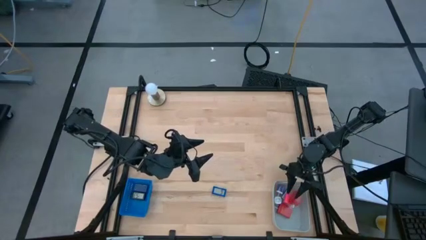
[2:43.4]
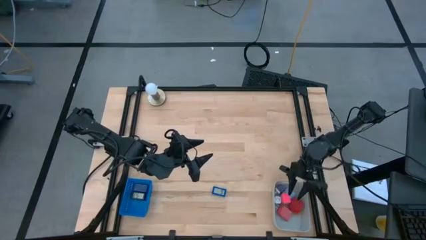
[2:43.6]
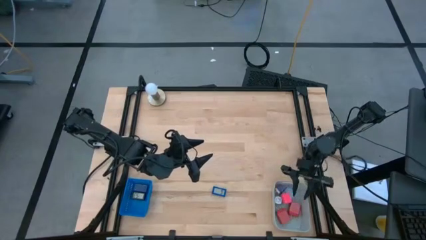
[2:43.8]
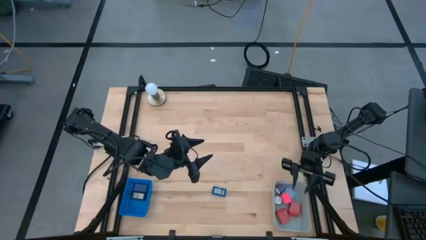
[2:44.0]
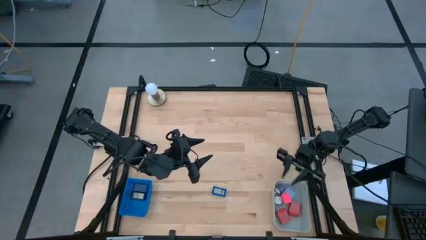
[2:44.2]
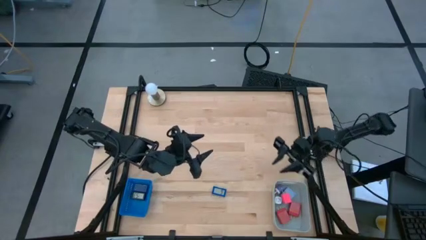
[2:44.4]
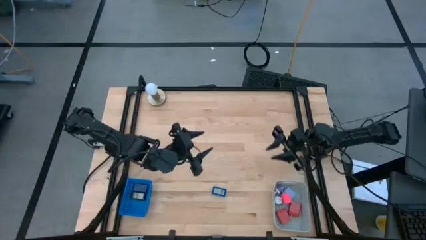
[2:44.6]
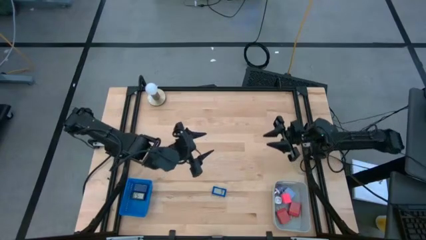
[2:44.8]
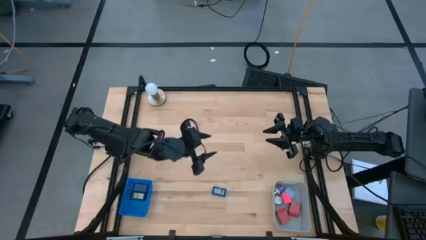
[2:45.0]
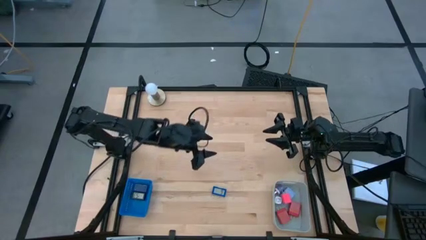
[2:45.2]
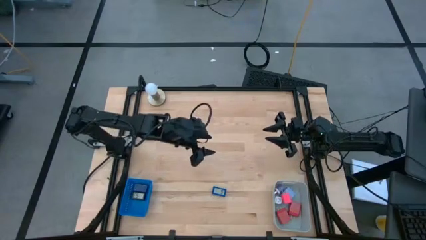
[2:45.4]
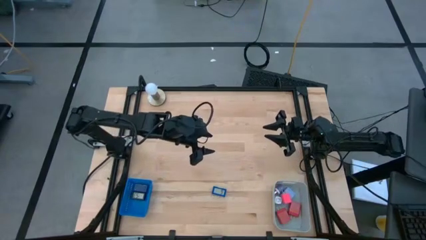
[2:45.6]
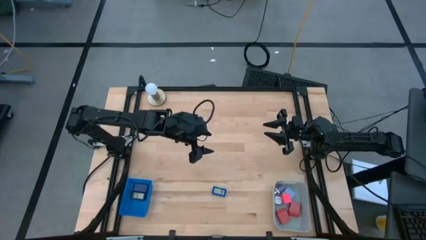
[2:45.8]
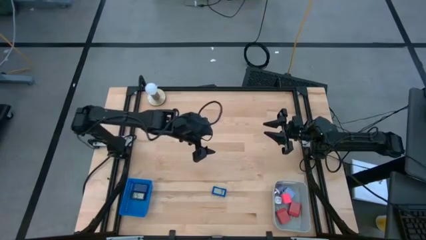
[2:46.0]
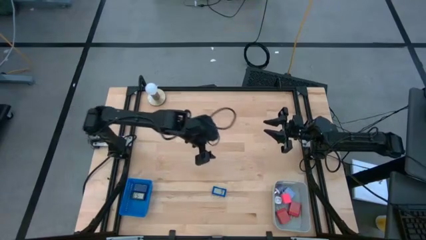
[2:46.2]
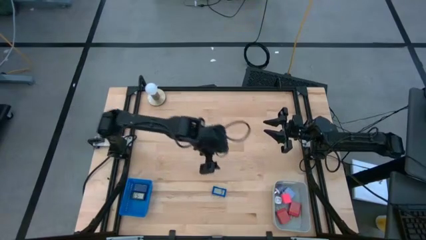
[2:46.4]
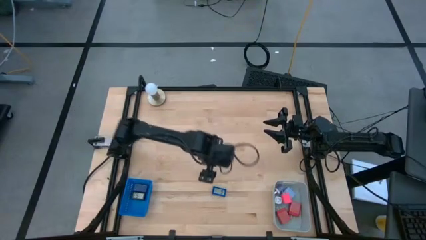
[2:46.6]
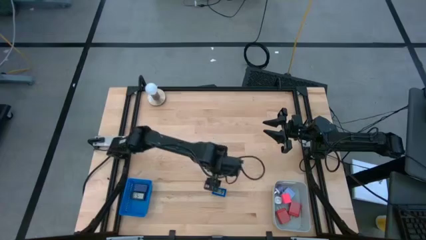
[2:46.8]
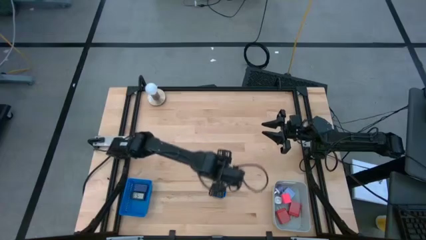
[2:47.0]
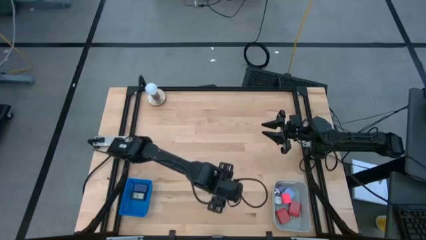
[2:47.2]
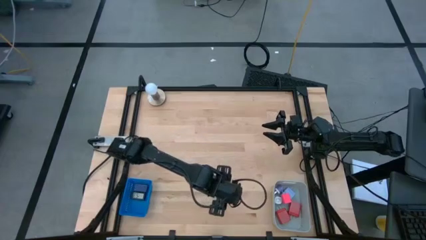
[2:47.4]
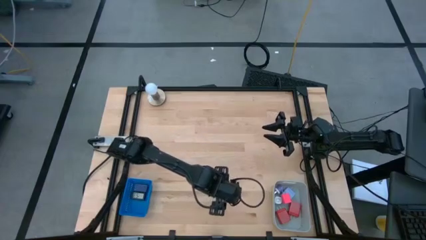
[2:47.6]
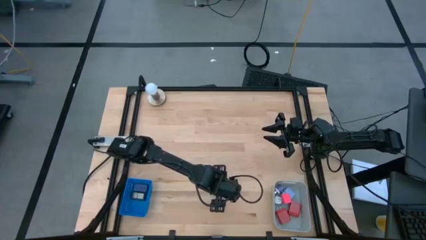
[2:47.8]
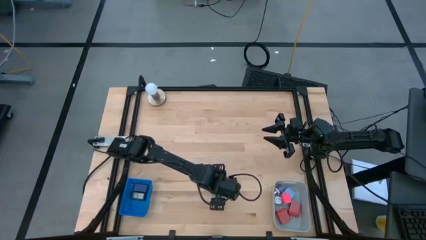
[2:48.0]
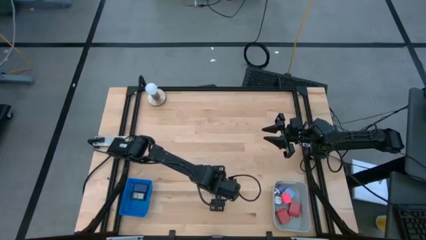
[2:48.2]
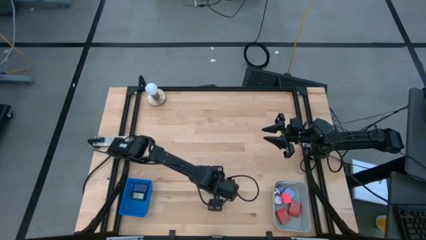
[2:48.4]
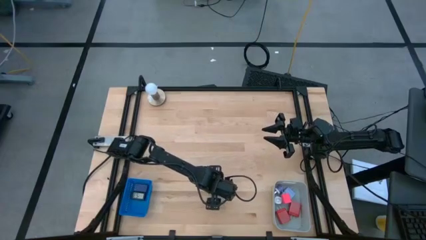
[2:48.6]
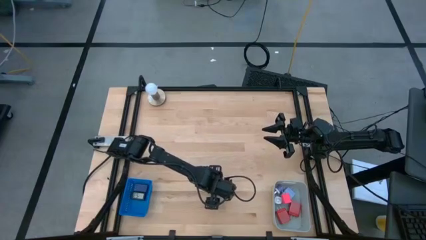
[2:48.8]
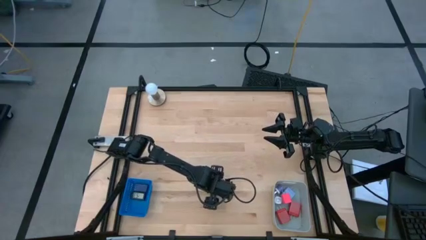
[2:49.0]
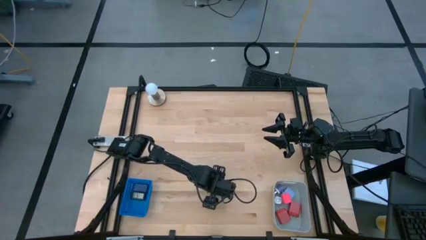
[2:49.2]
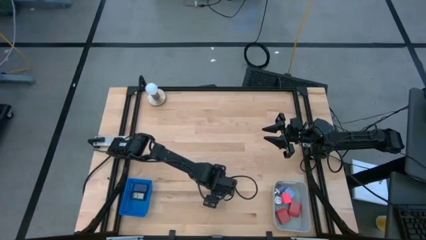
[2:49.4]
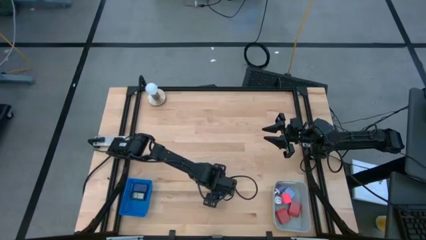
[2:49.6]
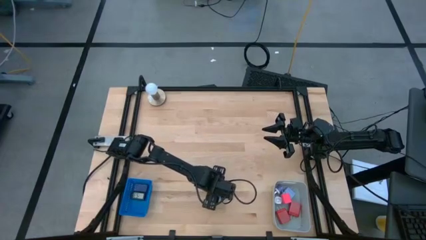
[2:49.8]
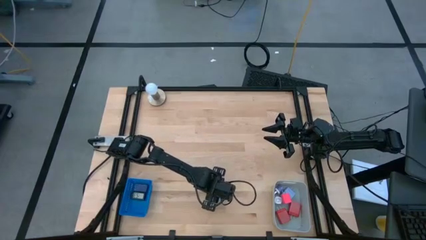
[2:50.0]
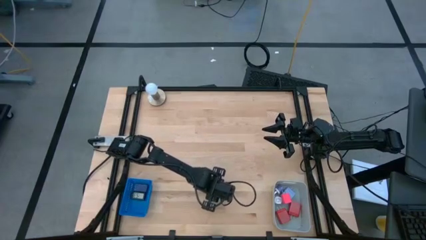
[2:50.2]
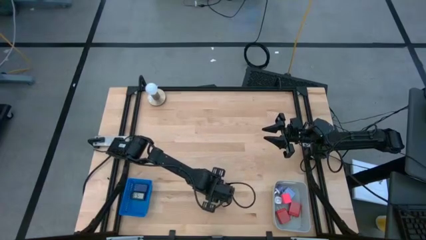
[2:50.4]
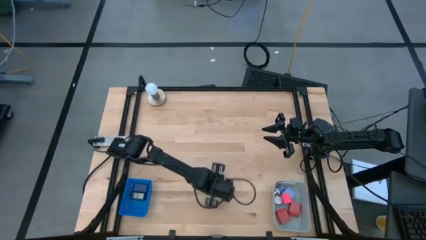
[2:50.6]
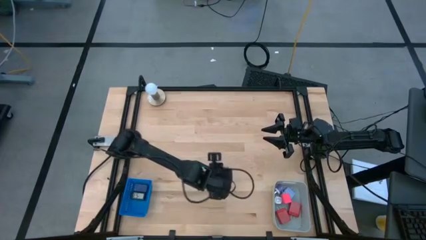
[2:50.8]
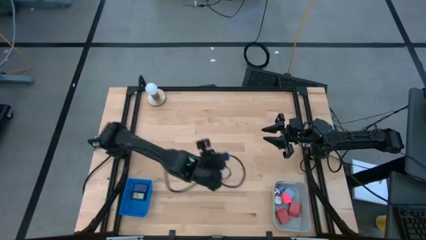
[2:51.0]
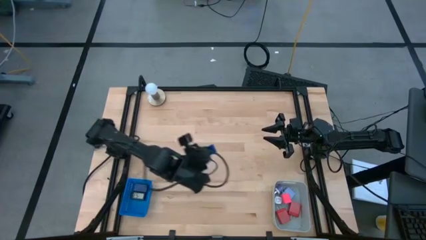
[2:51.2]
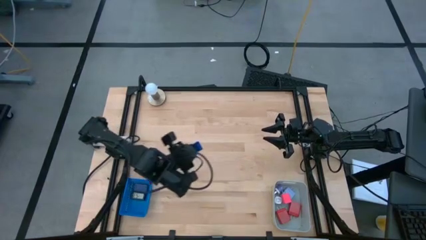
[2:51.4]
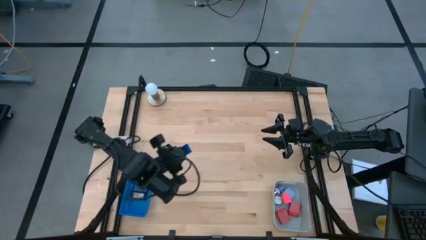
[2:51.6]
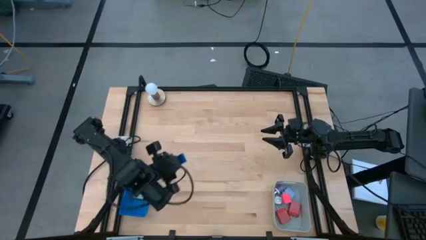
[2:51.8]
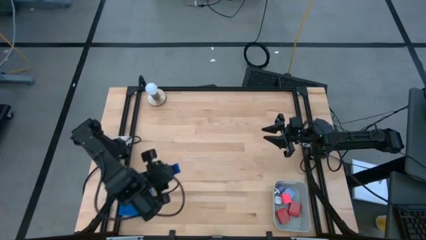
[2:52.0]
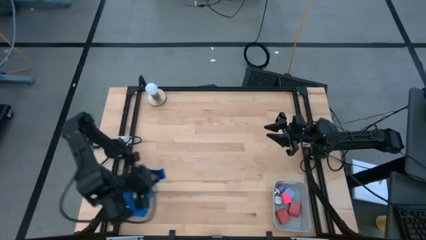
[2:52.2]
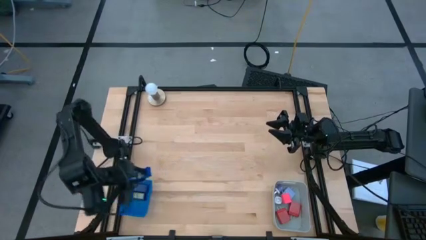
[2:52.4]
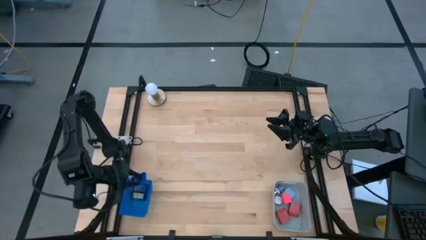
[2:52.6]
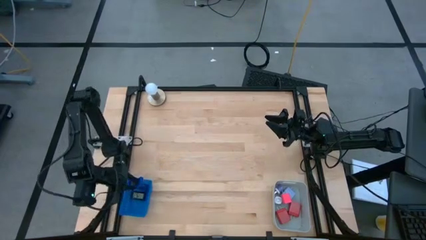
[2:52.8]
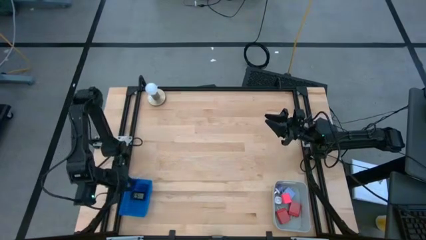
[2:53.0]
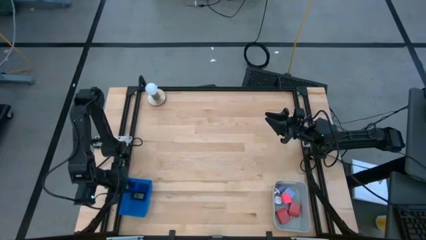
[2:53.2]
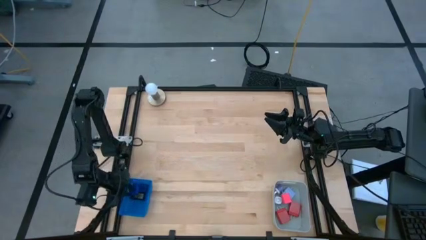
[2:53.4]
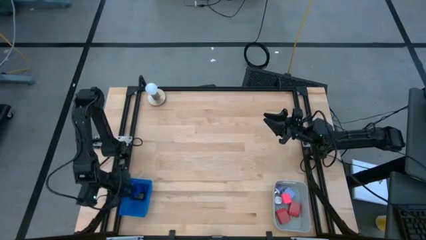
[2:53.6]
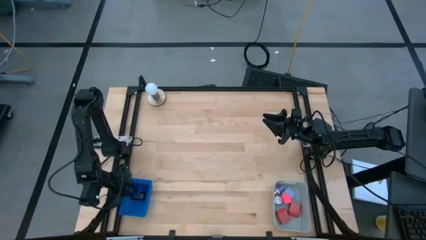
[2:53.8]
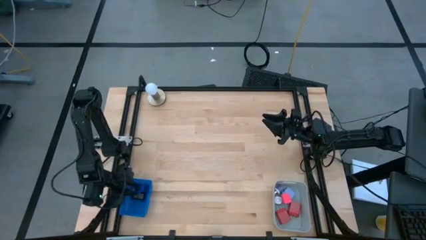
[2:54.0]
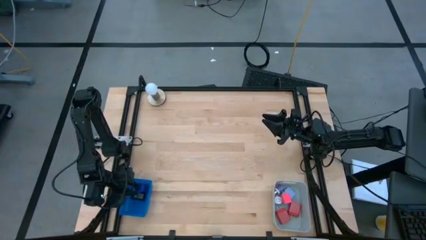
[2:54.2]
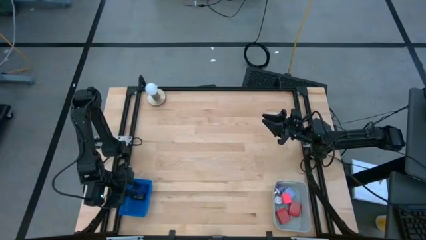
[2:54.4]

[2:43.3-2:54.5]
Task: Pick & Place Office items
Put the blue digital timer into the blue bin

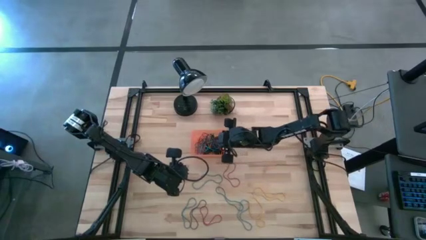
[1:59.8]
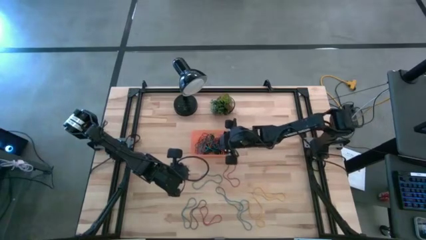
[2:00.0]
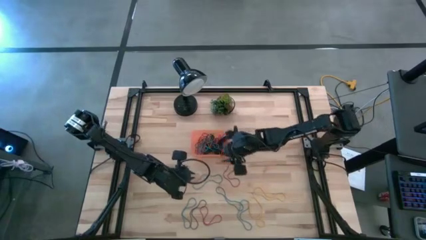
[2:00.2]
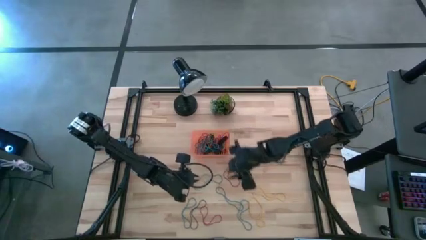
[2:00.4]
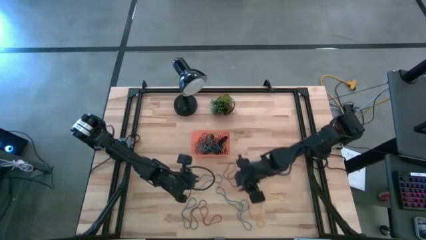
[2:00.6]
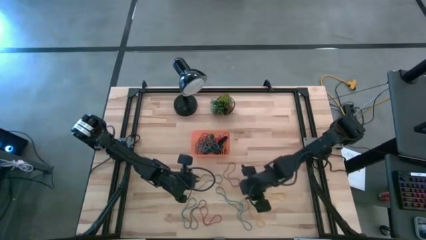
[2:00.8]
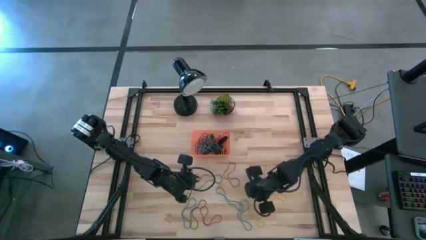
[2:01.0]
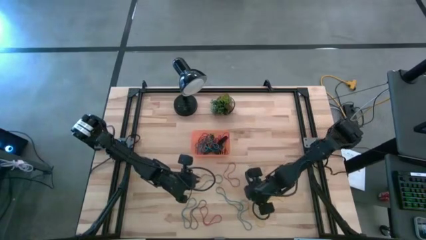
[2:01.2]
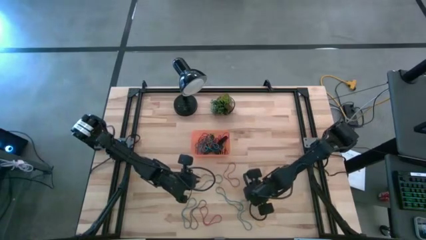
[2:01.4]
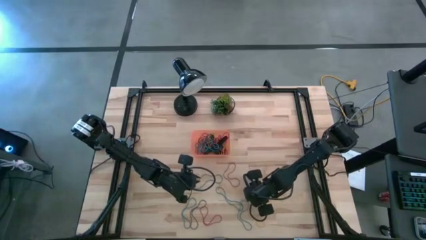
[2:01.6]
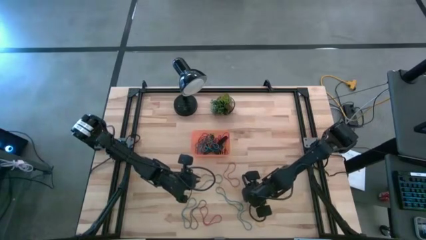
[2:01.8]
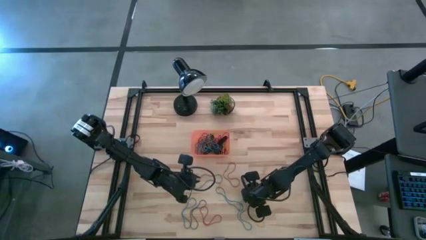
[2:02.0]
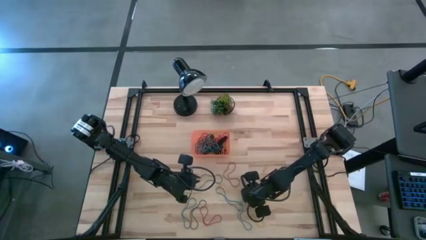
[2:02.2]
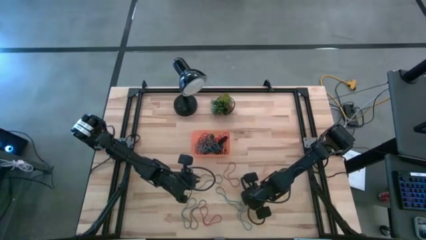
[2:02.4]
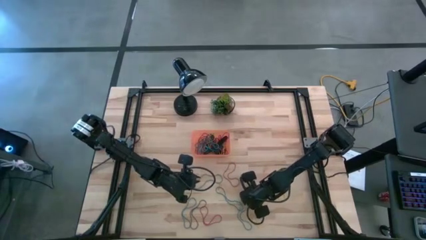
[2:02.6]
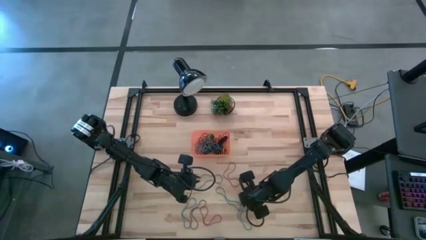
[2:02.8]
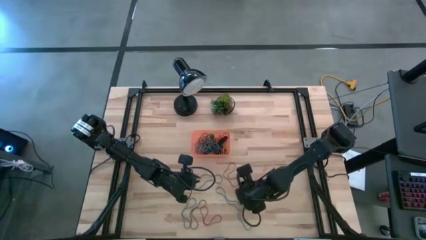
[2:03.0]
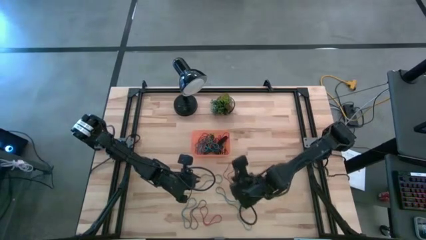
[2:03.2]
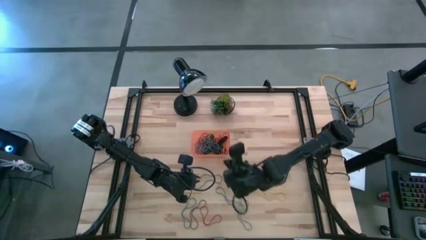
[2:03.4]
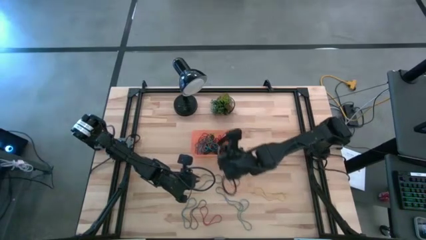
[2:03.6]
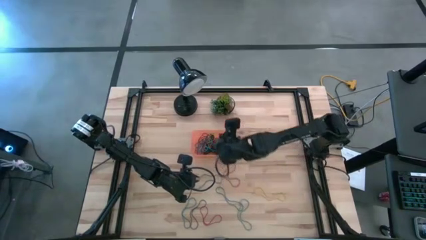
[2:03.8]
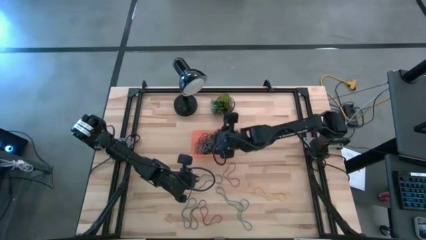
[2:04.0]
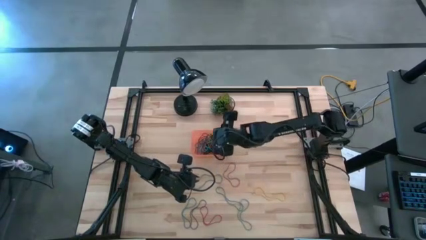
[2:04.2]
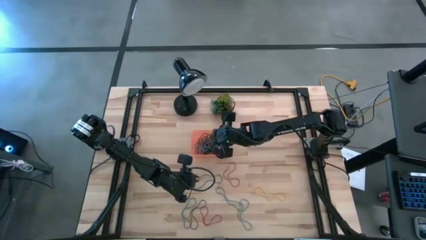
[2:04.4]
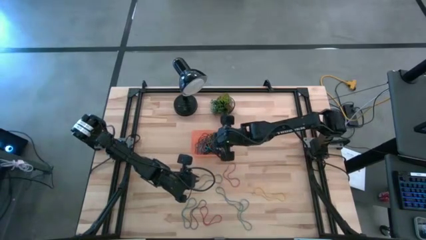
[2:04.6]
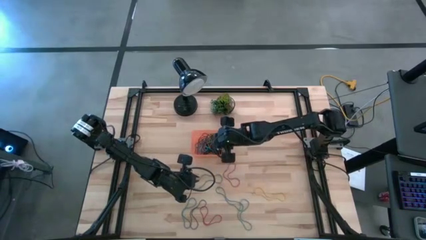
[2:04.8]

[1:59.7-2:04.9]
Task: Pick and place rubber bands into bin
Put the yellow rubberband into the orange bin
